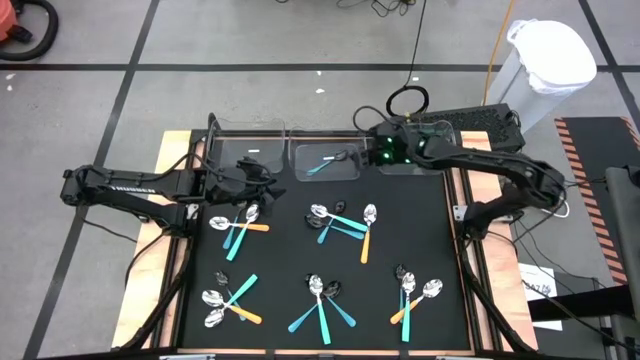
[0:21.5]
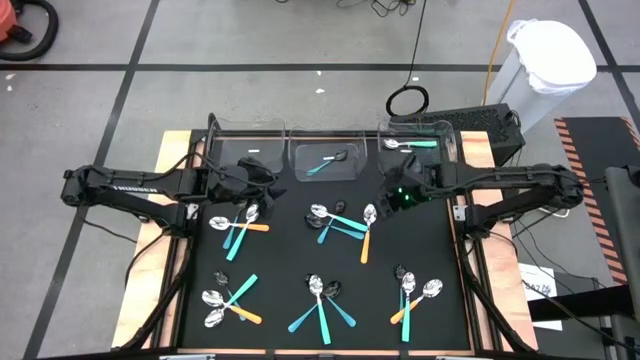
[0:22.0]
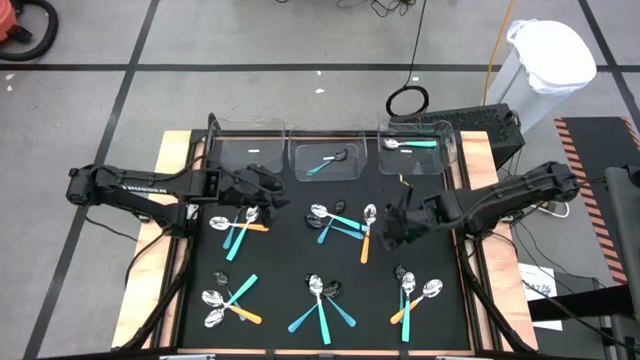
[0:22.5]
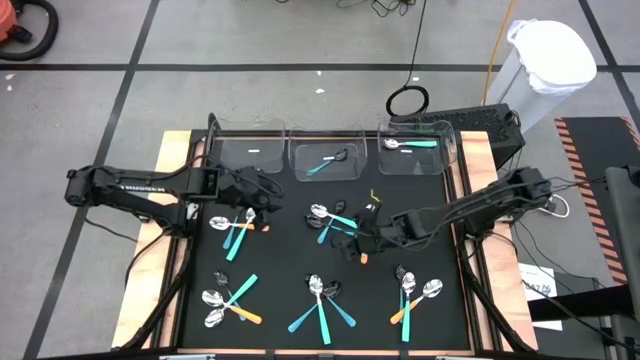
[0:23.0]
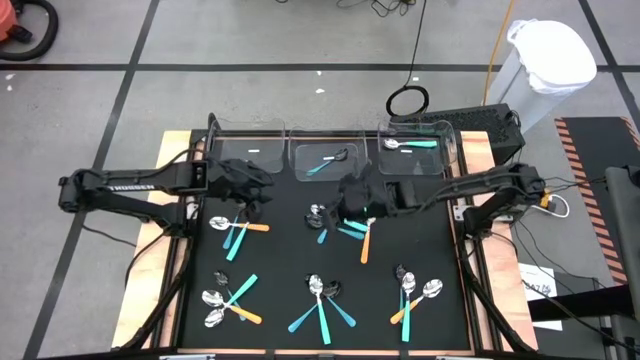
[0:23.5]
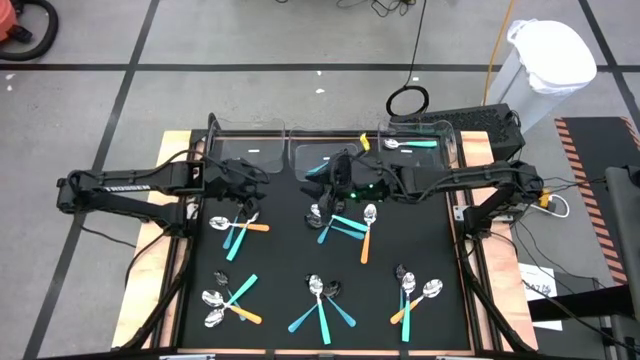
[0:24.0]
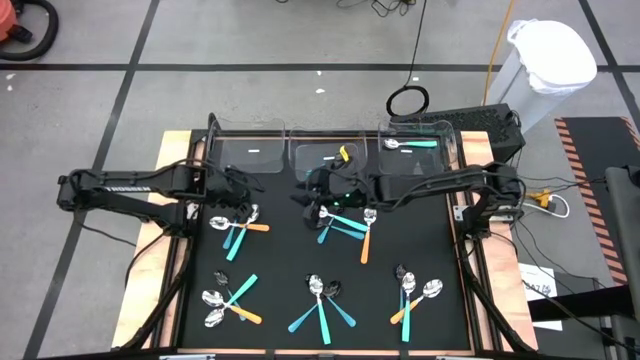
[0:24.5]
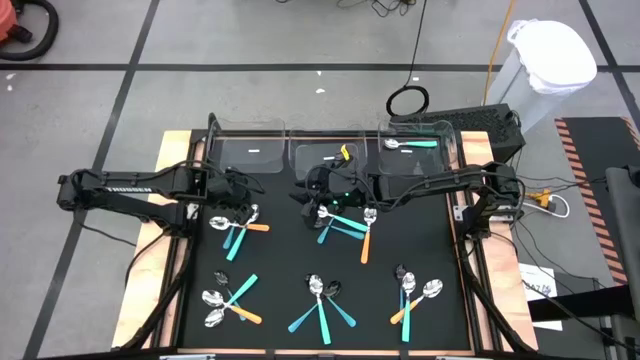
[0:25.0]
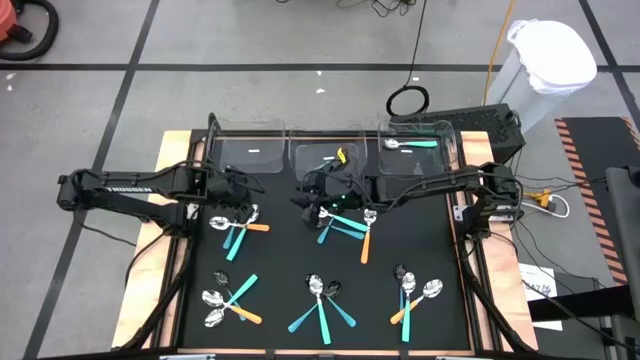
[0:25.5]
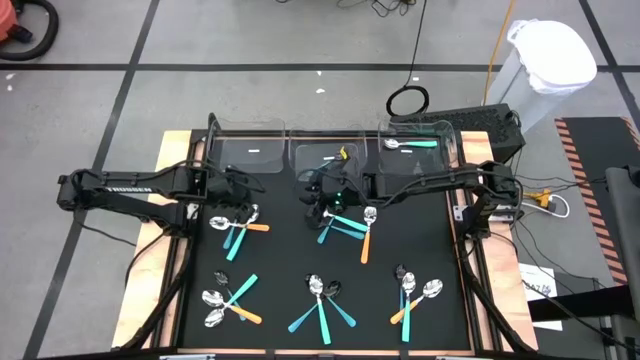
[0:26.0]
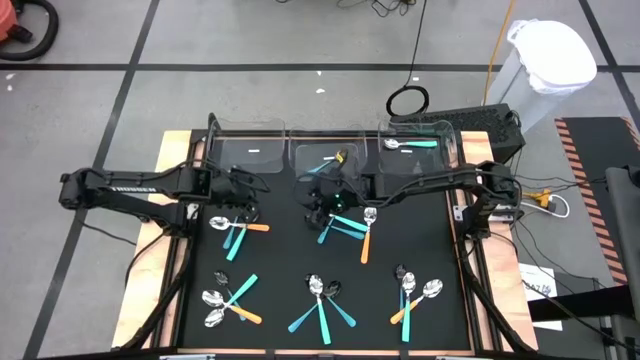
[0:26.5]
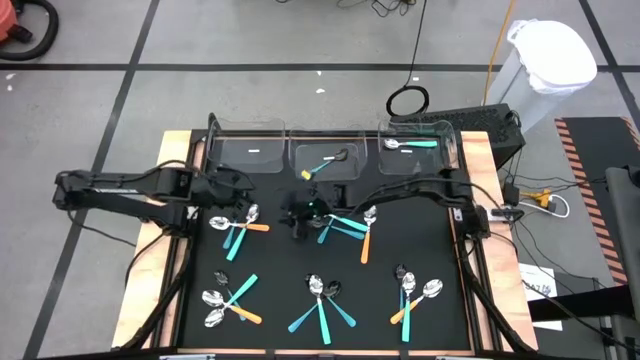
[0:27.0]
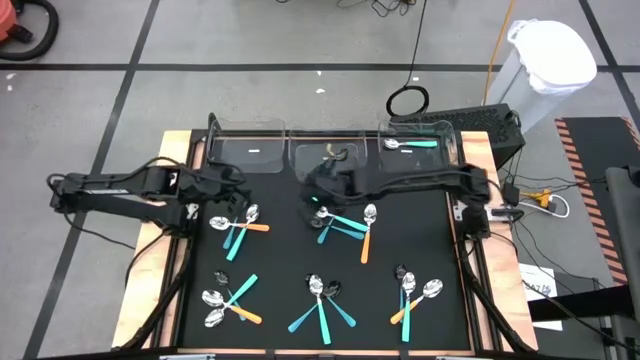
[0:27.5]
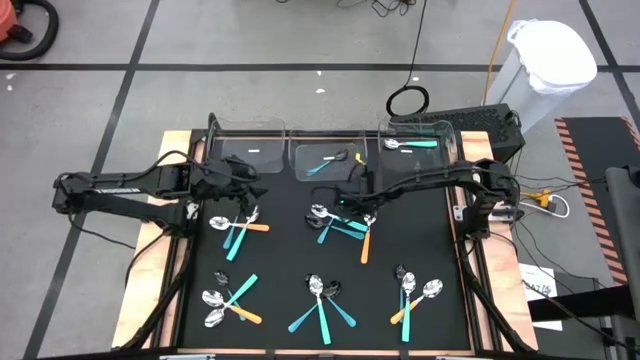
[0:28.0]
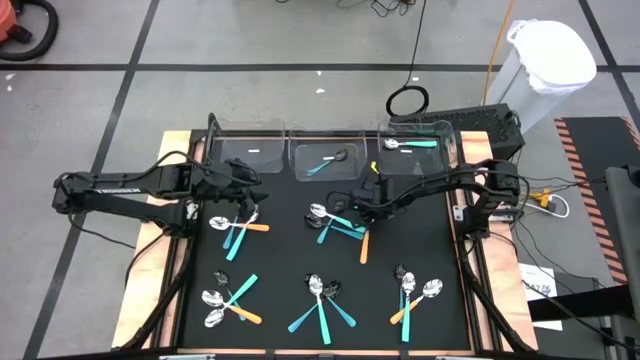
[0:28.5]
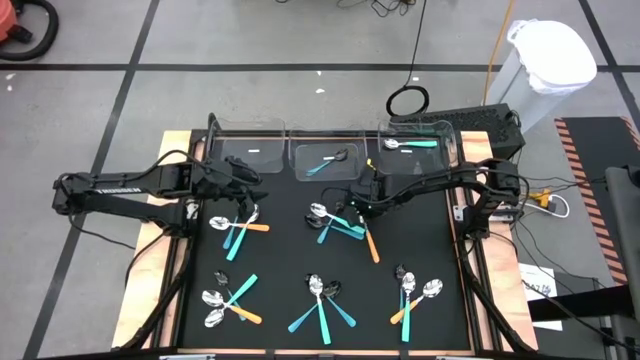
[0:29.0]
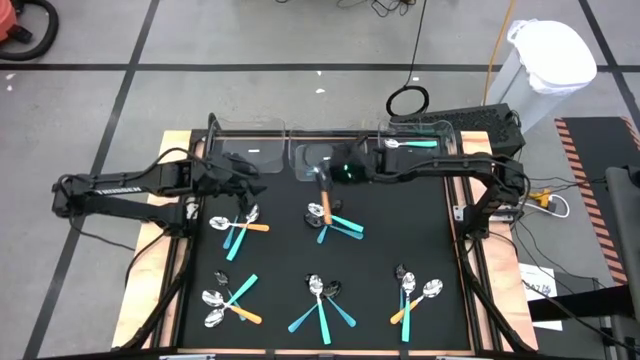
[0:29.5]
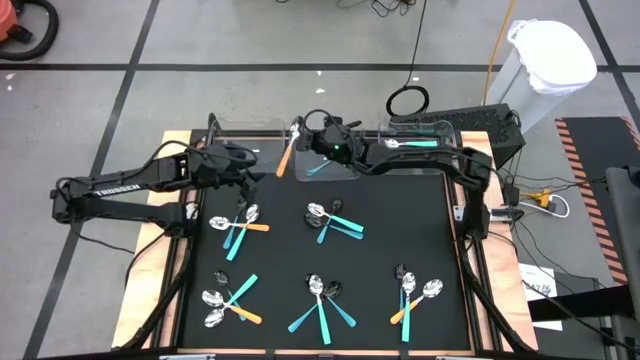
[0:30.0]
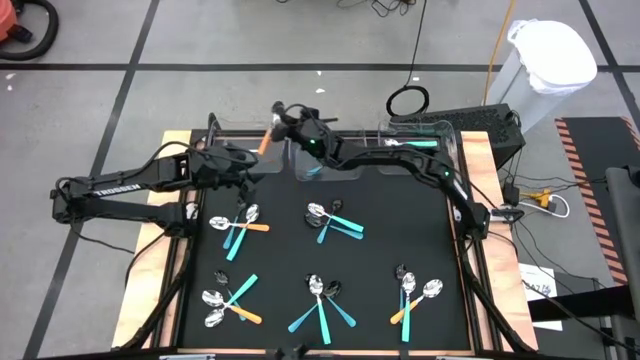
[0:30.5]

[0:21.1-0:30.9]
Task: Sort silverware by color (type)
Put the yellow spoon into the left transparent bin

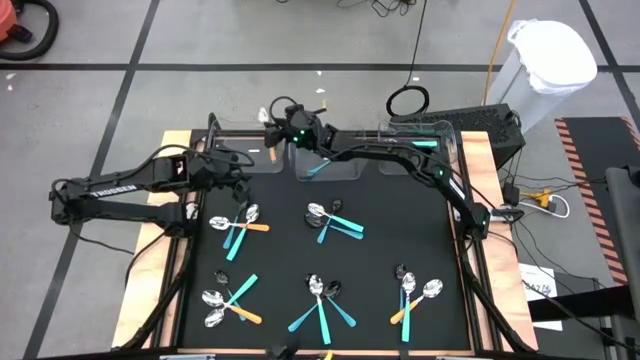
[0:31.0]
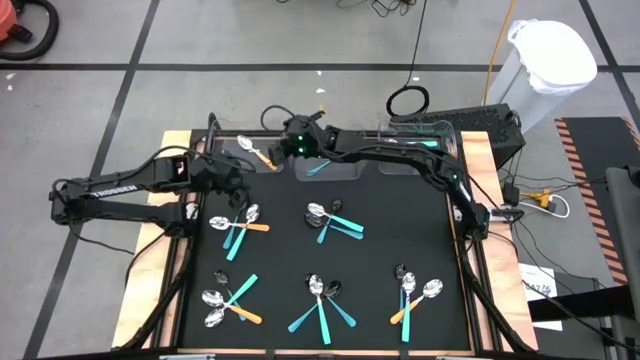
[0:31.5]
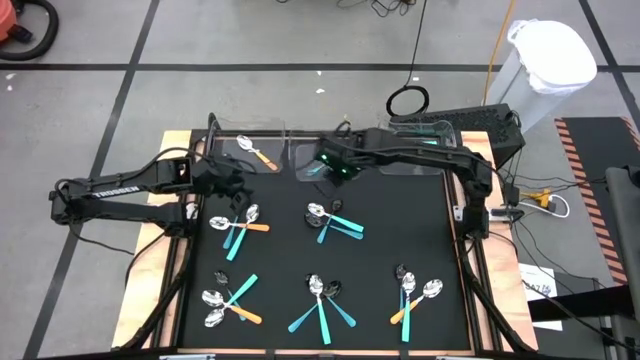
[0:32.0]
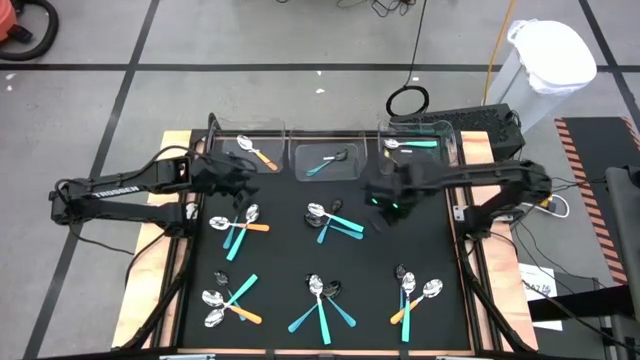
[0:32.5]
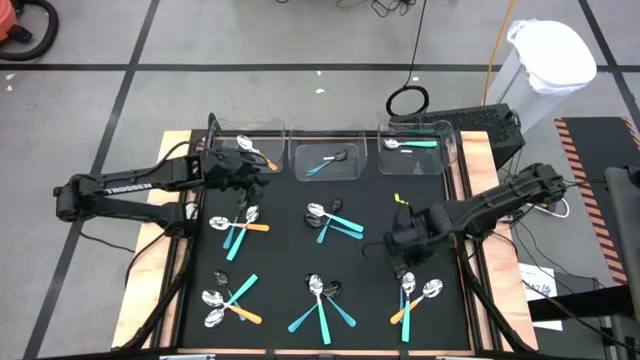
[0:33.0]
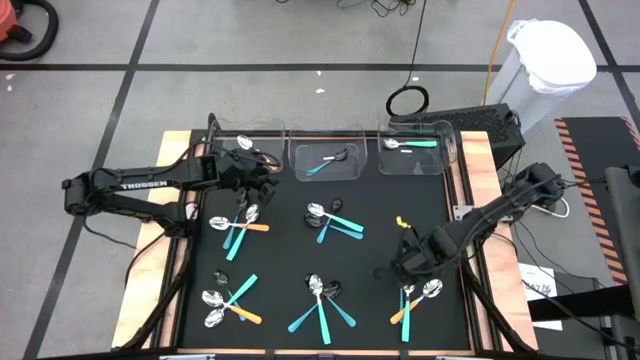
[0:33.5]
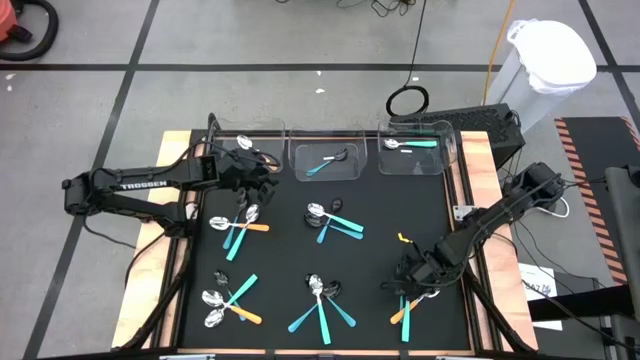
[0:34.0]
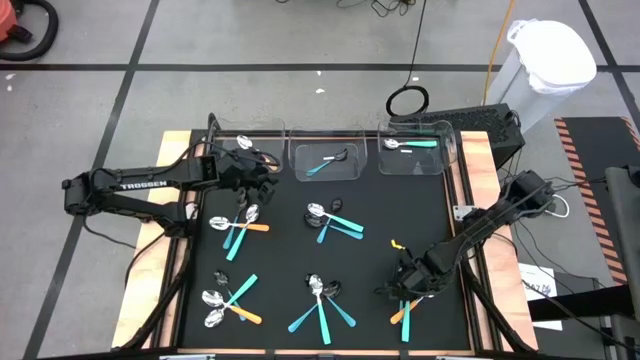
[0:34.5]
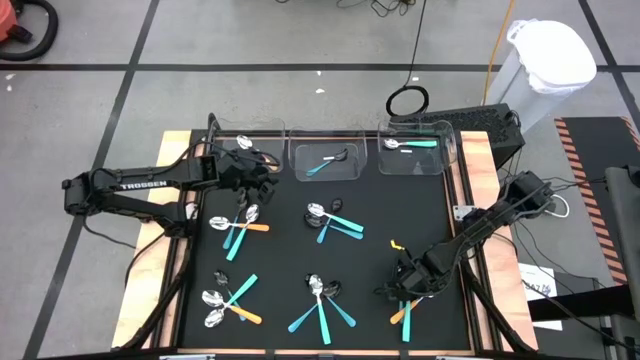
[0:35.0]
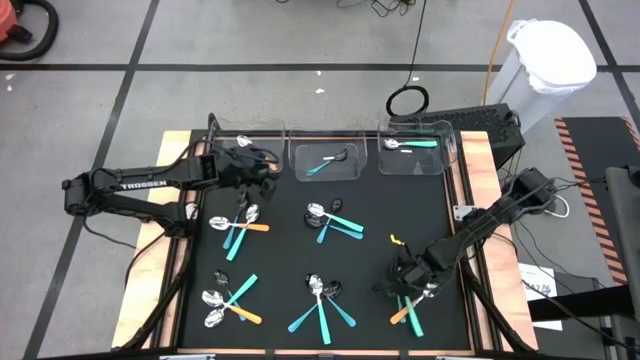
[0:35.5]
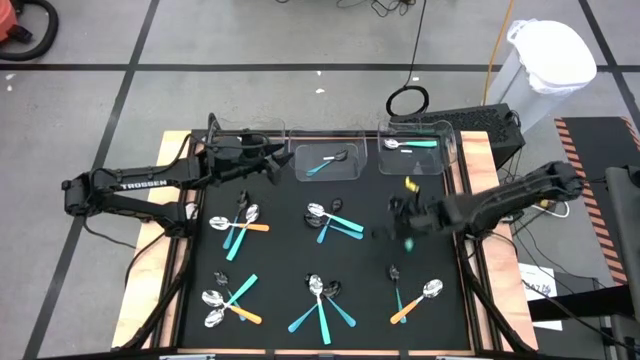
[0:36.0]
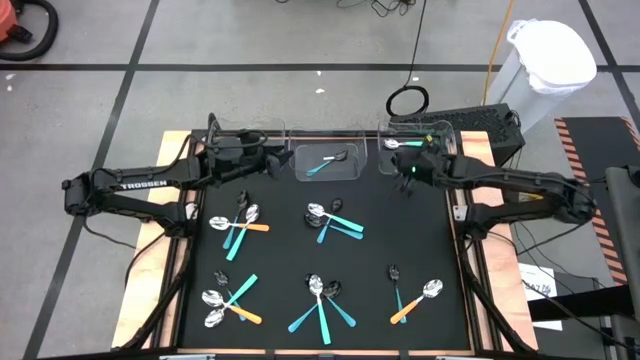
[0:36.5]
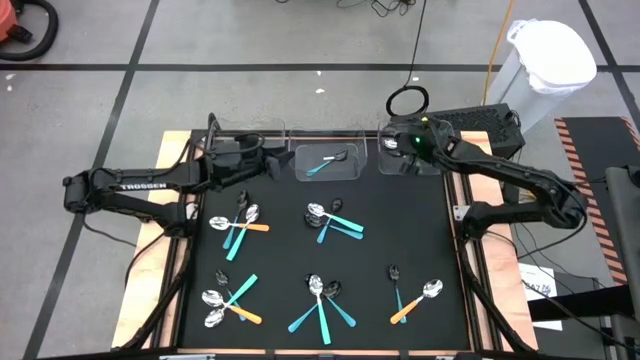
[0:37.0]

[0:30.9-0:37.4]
Put the light green spoon into the right transparent bin

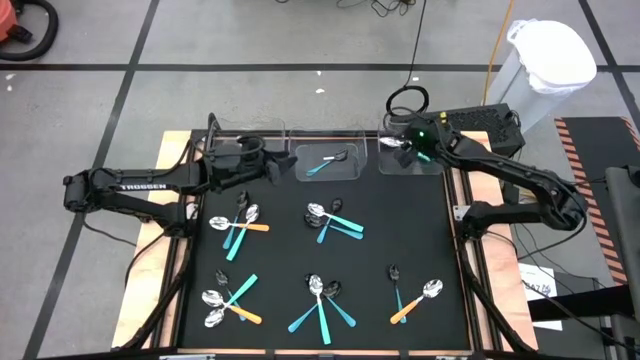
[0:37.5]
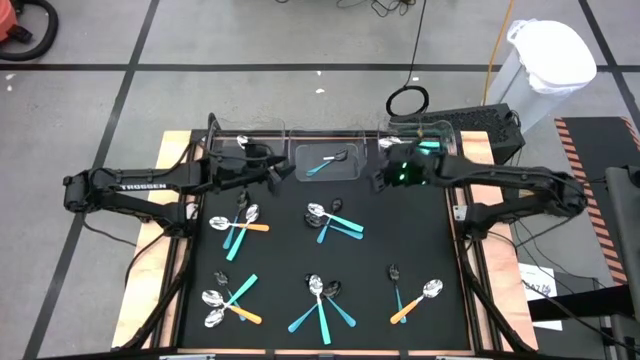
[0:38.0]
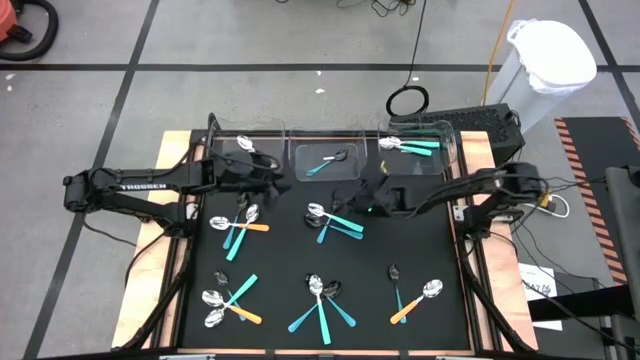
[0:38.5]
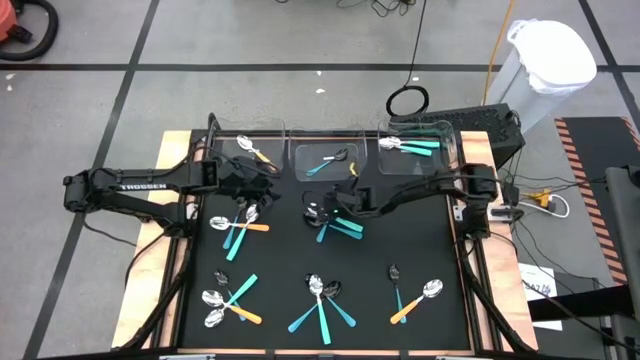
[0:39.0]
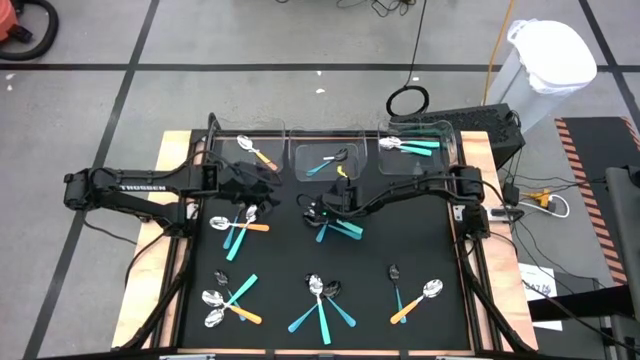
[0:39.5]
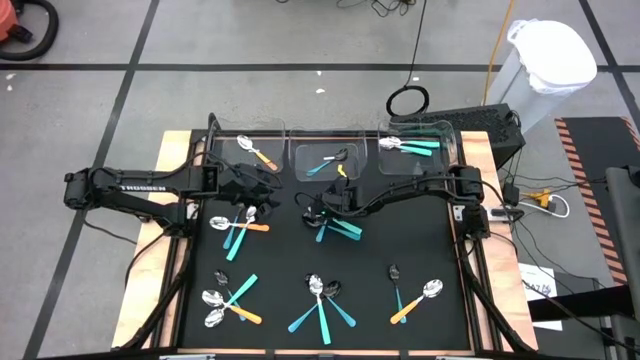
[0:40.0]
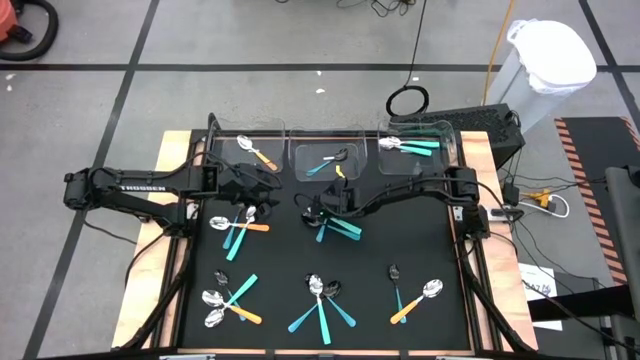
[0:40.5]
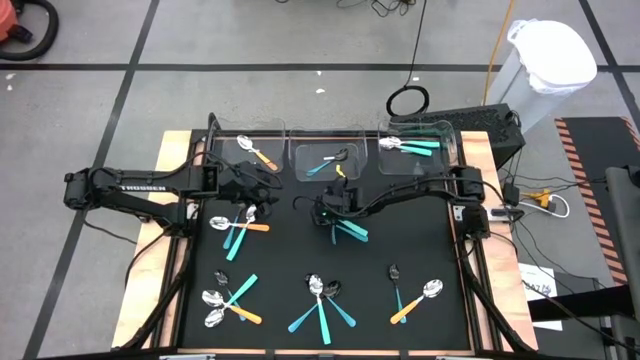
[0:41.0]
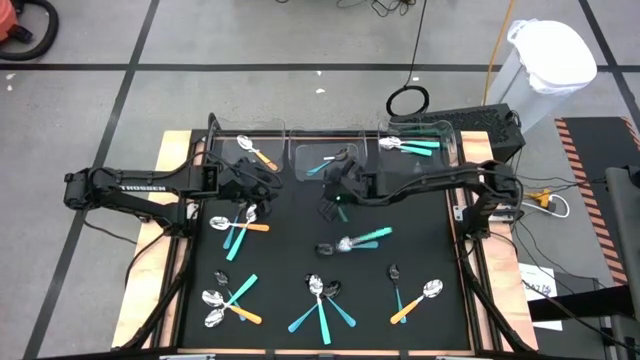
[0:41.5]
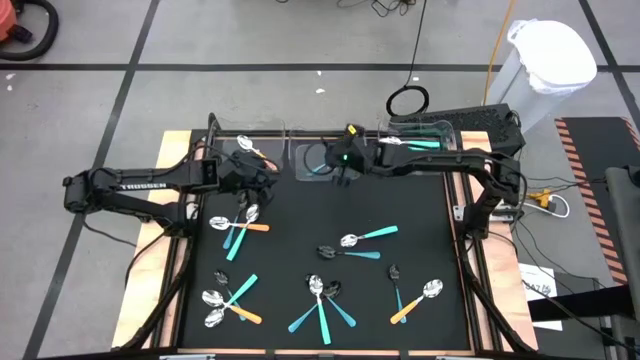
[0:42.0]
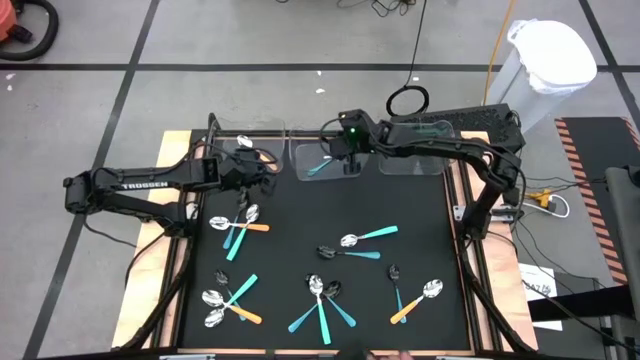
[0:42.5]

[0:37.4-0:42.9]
Put the light blue spoon into the middle transparent bin

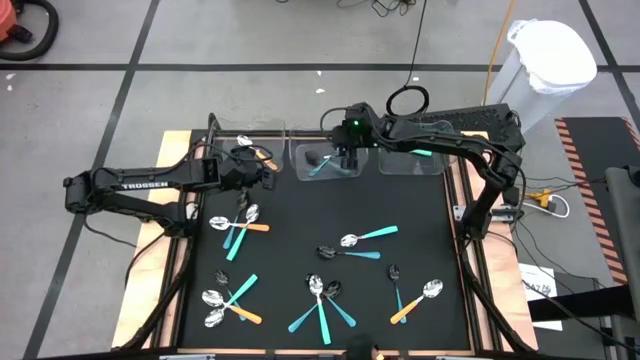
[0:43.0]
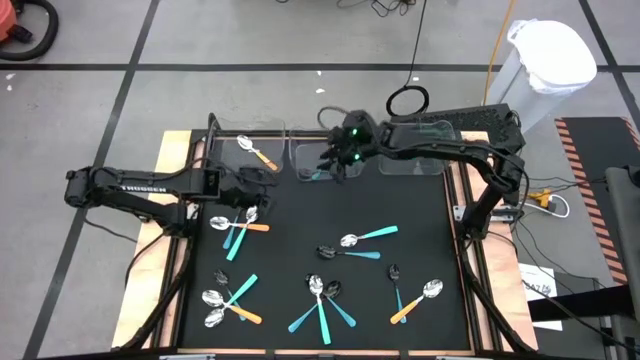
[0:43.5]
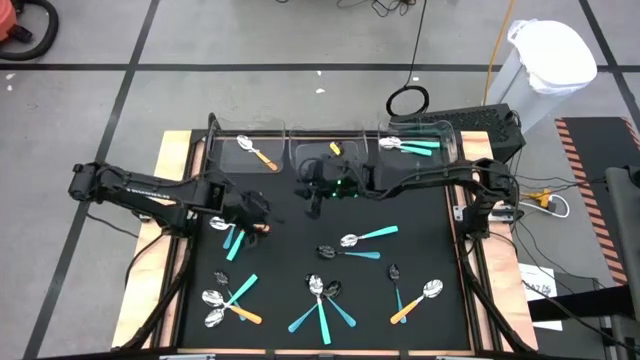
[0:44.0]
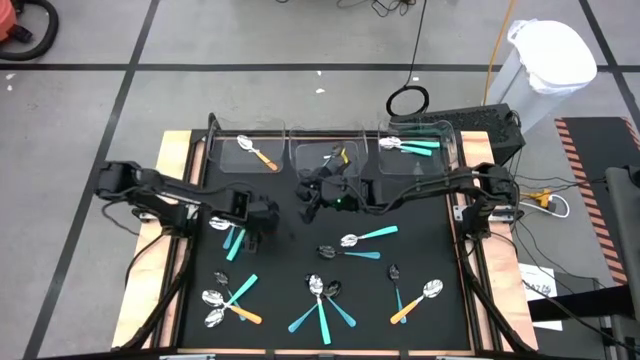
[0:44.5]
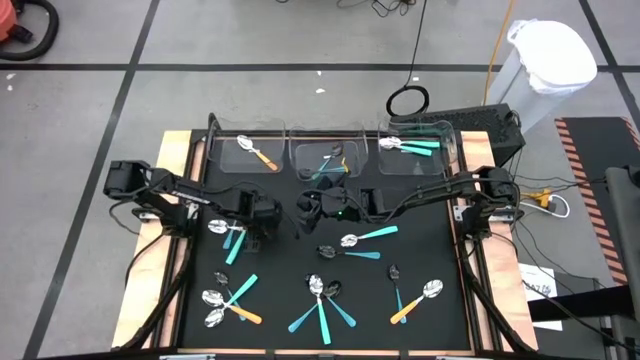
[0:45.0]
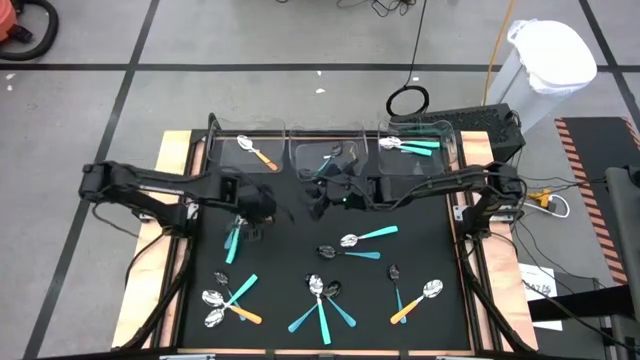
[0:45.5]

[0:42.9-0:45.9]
Put the yellow spoon into the left transparent bin
